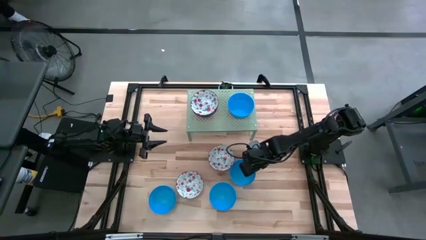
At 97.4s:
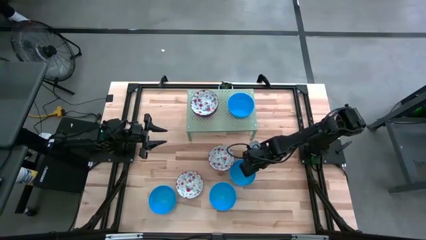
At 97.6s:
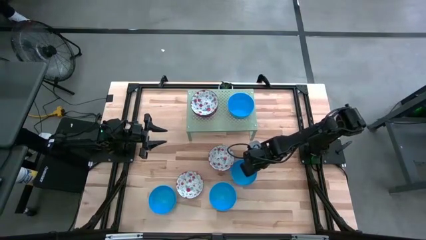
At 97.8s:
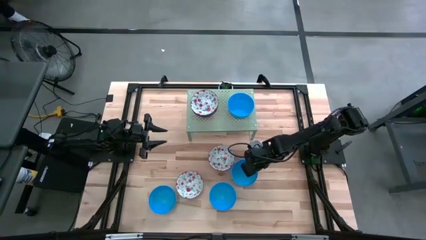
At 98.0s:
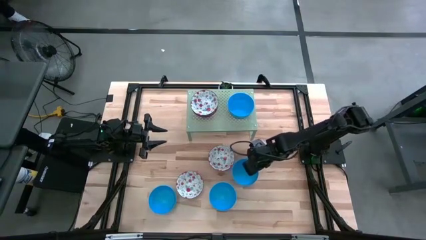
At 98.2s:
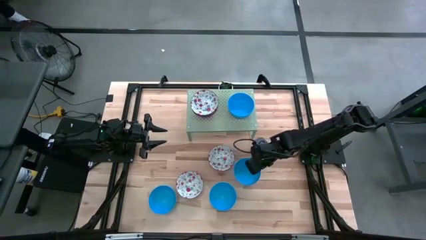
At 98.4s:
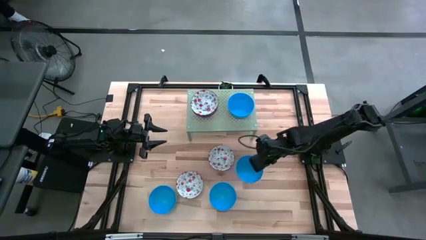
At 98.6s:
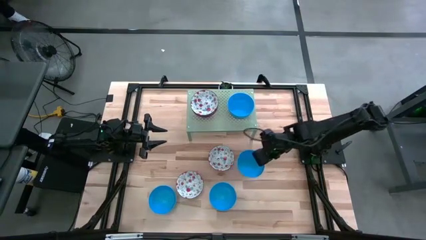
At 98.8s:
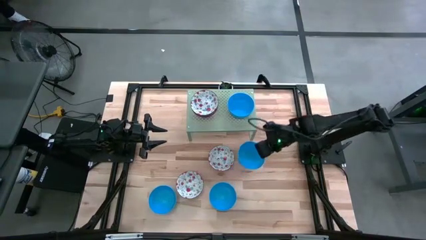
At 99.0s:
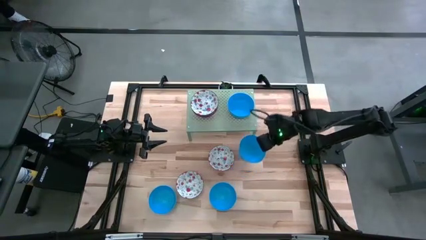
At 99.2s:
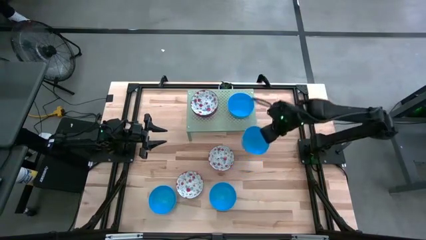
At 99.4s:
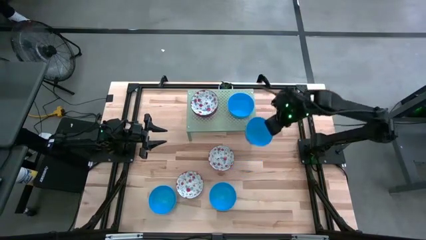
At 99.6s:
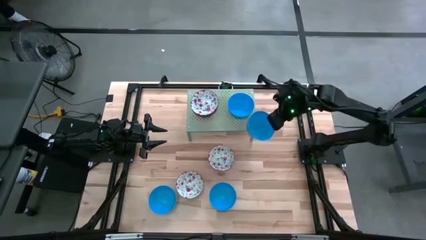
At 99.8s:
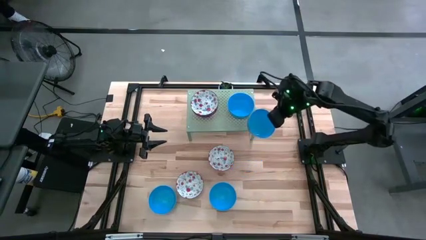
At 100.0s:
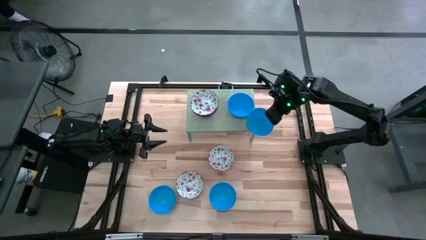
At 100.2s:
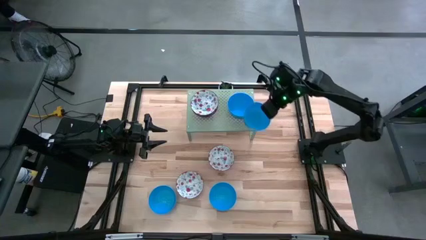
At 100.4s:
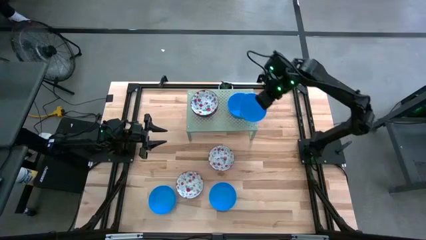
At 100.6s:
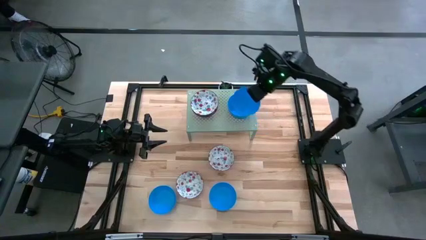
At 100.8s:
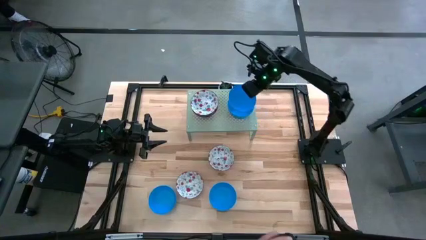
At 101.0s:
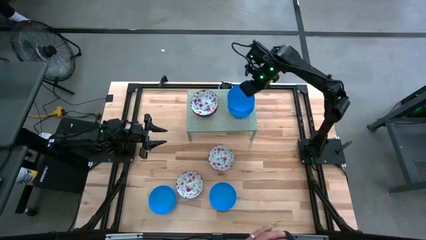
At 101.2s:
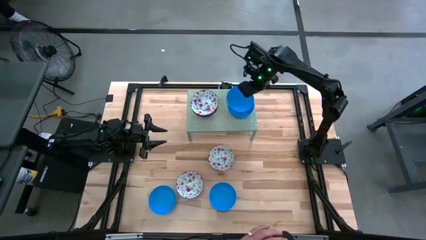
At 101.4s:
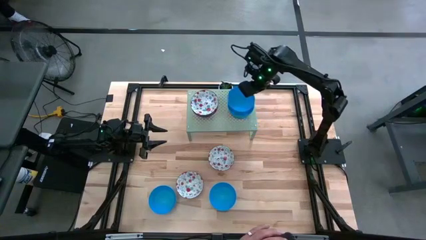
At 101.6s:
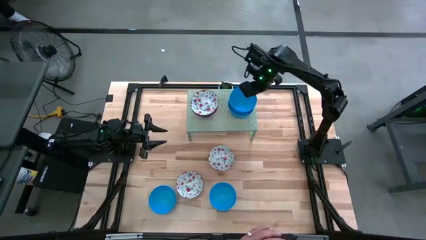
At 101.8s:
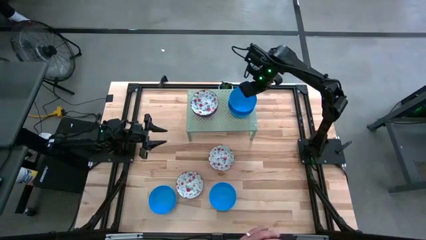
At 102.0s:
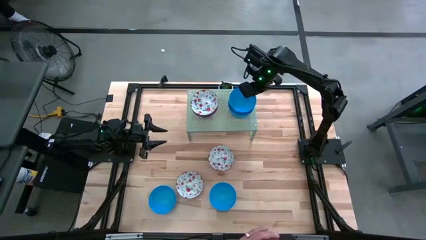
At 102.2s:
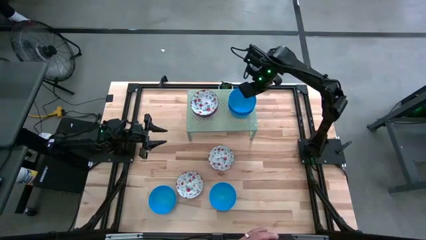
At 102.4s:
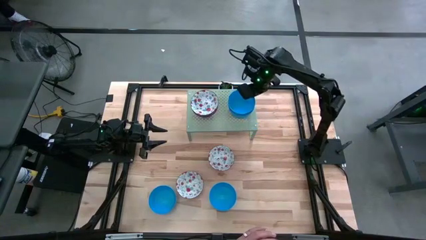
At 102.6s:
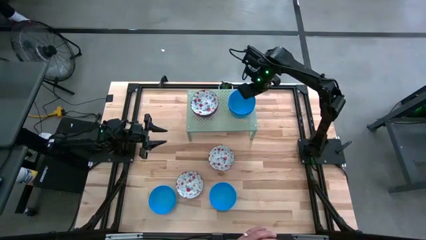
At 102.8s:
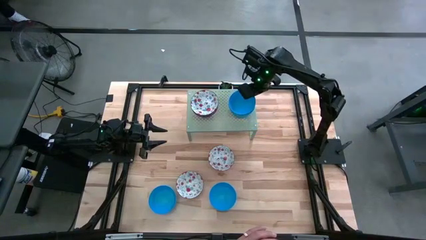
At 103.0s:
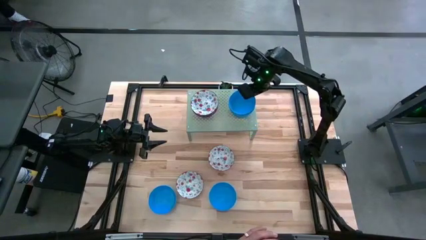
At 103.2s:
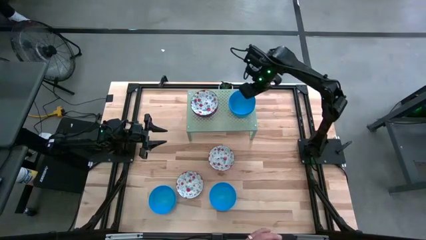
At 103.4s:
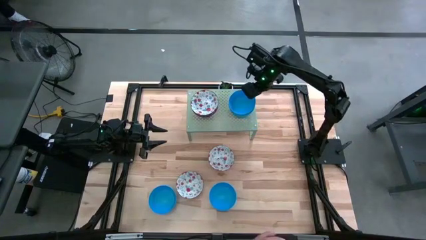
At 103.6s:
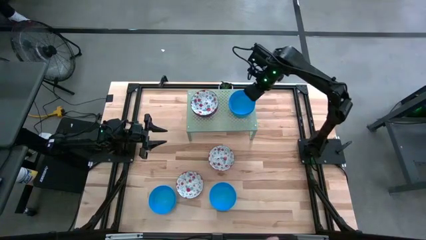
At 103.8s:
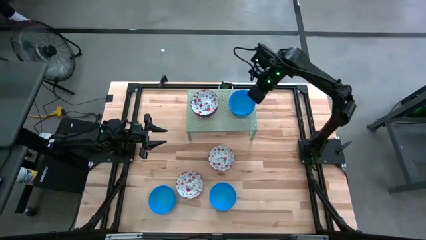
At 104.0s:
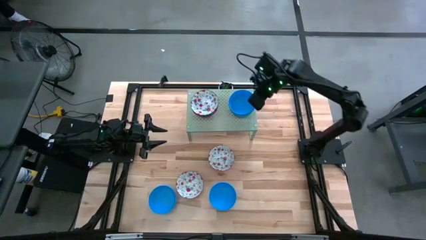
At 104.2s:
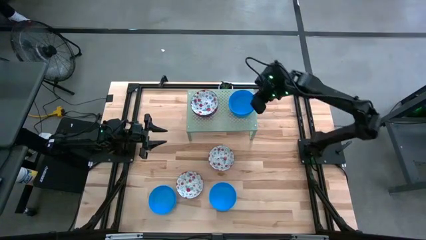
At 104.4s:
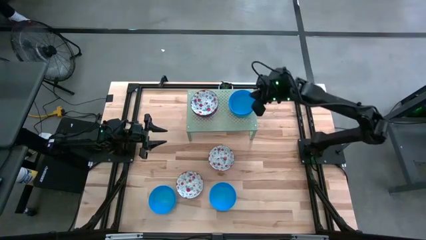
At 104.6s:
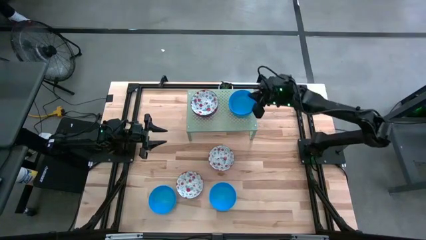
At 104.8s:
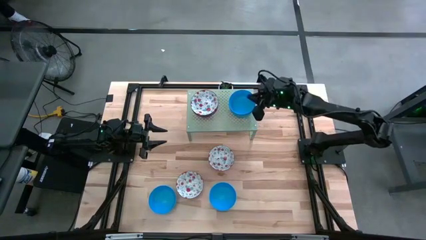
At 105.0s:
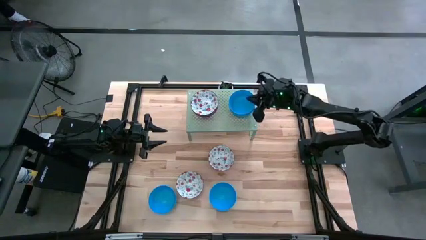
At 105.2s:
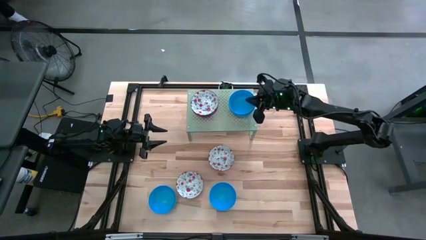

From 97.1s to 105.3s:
Task: Pick & Place Mini bowls
Stack the blue bowl on the blue bowl on the shelf

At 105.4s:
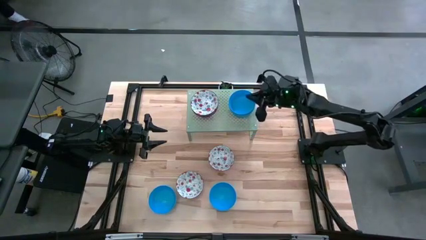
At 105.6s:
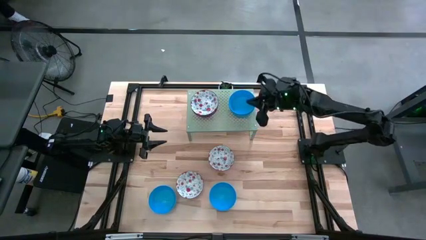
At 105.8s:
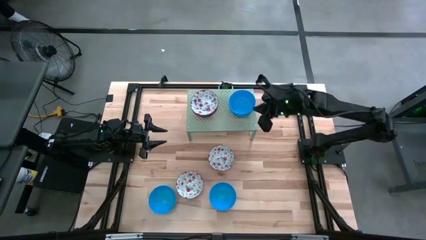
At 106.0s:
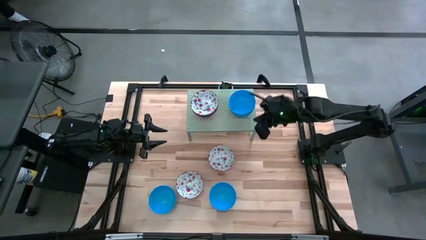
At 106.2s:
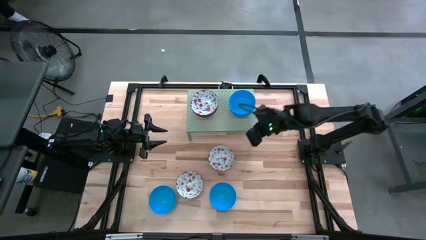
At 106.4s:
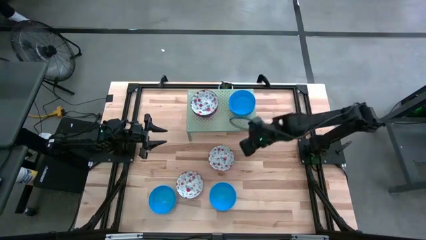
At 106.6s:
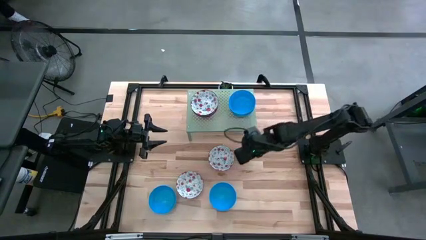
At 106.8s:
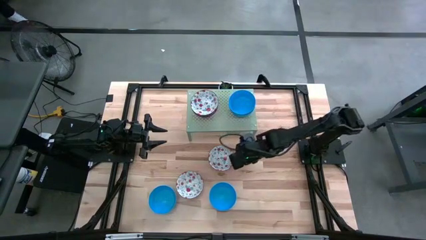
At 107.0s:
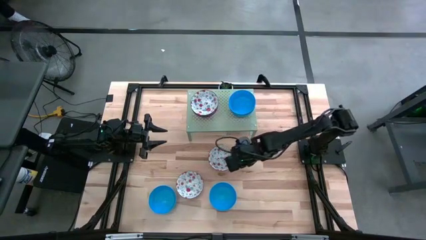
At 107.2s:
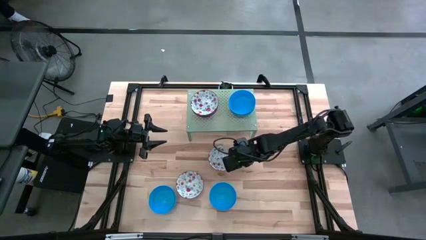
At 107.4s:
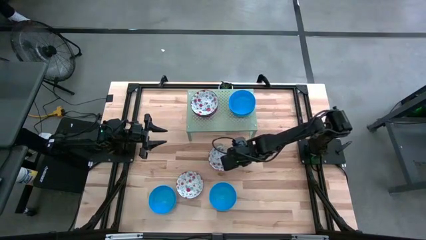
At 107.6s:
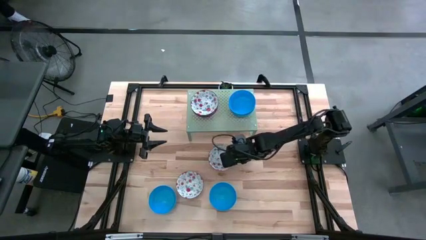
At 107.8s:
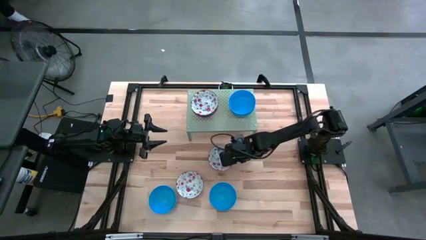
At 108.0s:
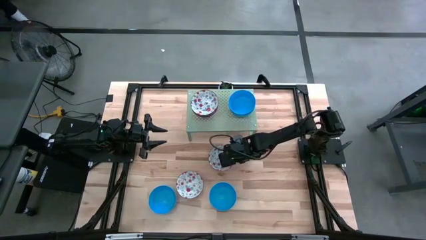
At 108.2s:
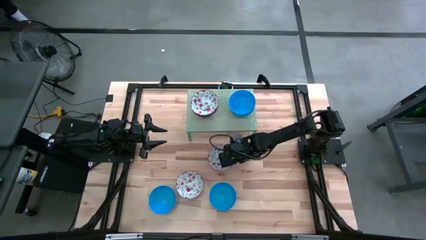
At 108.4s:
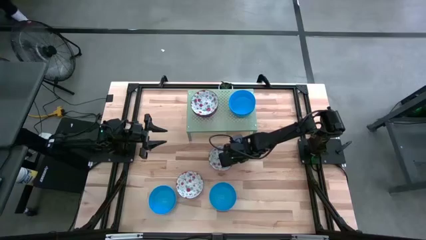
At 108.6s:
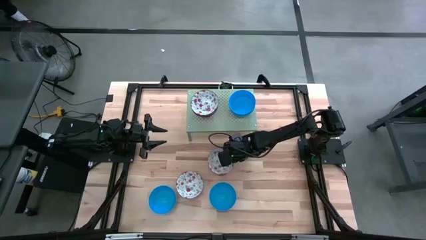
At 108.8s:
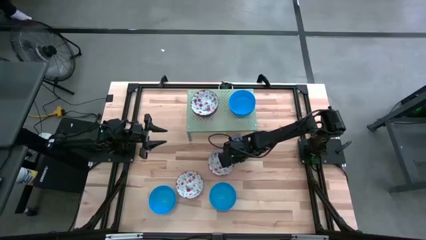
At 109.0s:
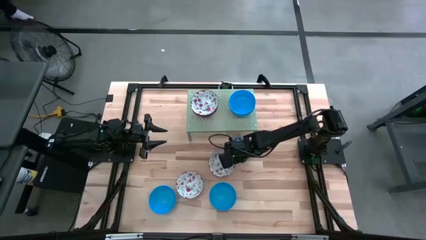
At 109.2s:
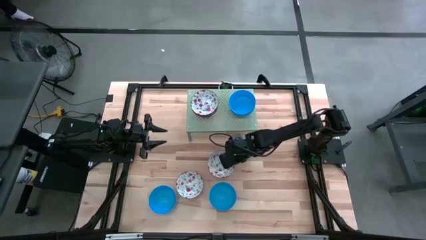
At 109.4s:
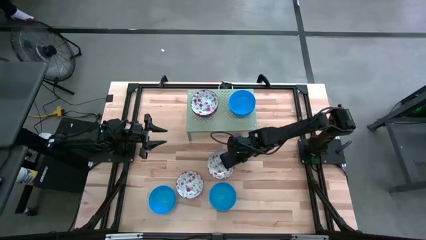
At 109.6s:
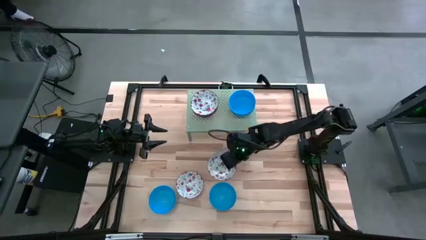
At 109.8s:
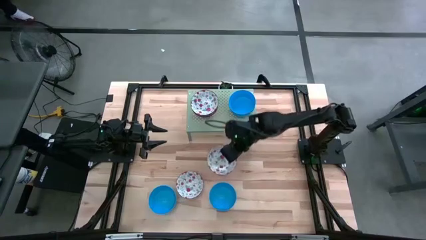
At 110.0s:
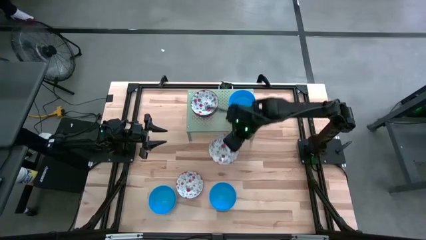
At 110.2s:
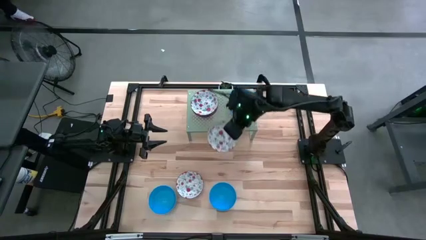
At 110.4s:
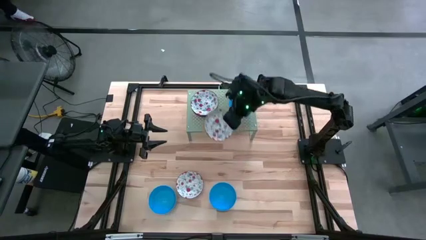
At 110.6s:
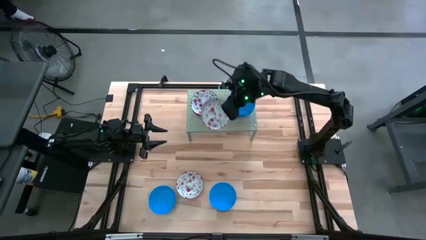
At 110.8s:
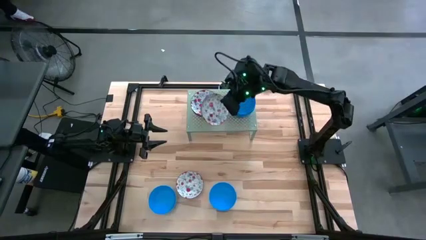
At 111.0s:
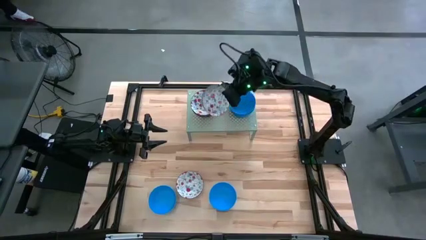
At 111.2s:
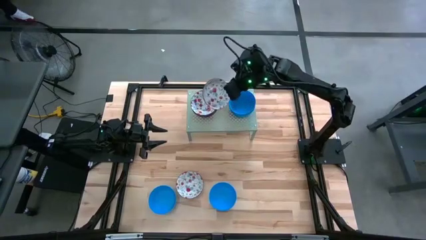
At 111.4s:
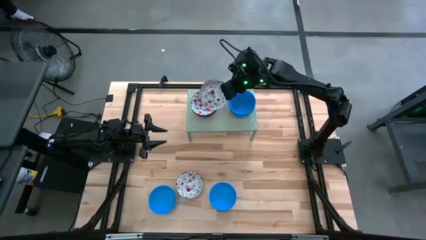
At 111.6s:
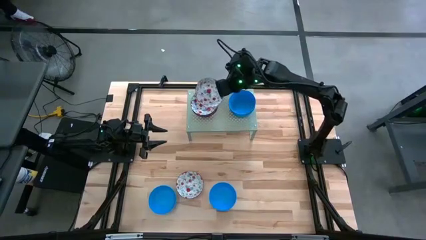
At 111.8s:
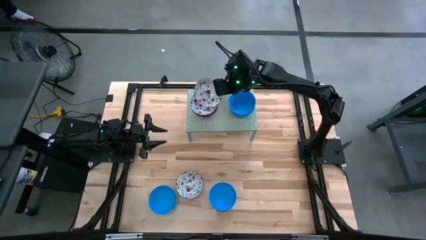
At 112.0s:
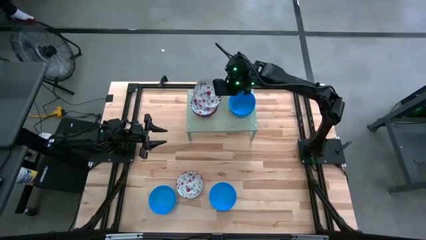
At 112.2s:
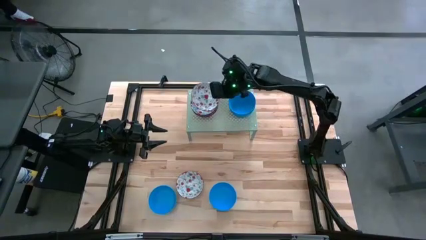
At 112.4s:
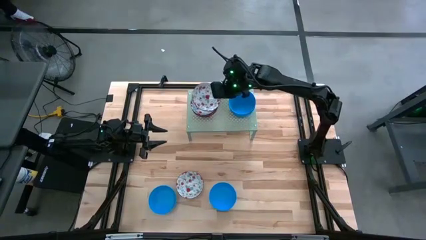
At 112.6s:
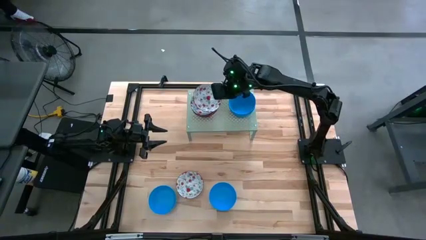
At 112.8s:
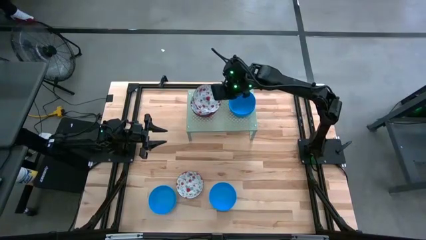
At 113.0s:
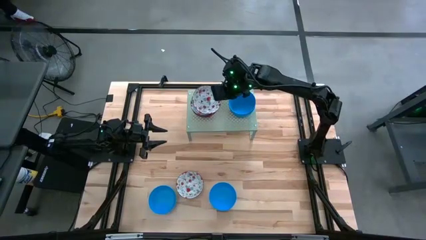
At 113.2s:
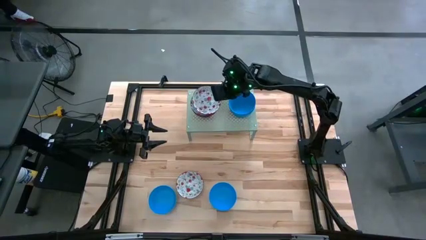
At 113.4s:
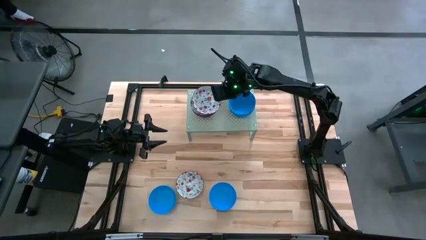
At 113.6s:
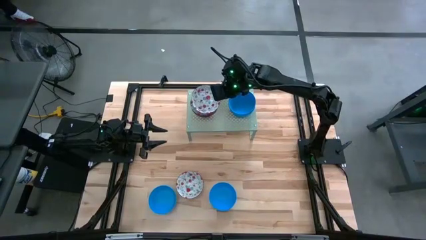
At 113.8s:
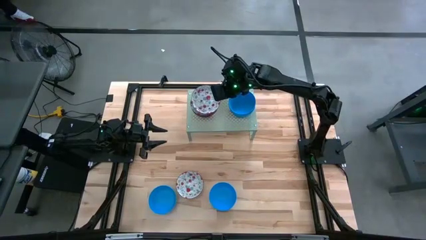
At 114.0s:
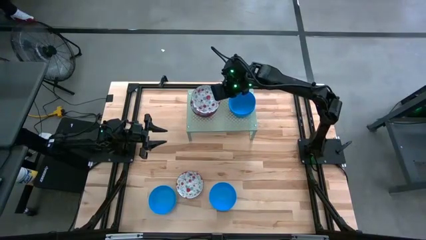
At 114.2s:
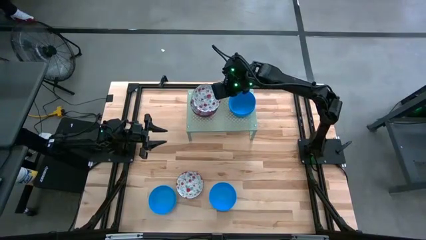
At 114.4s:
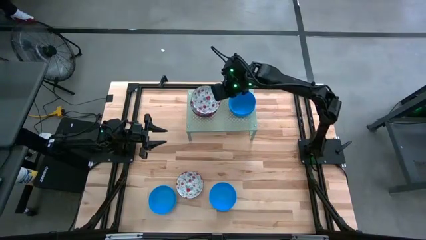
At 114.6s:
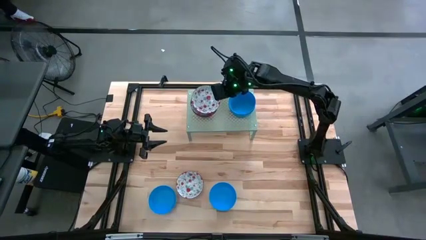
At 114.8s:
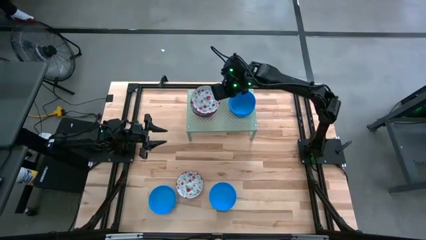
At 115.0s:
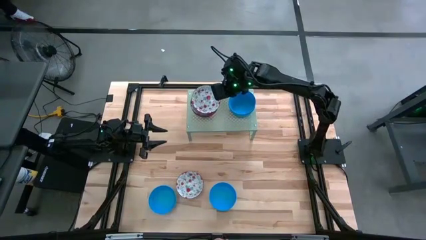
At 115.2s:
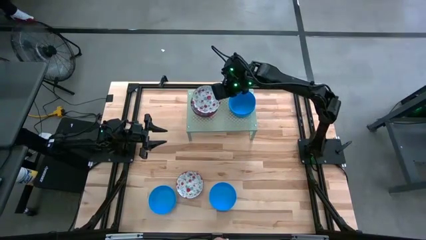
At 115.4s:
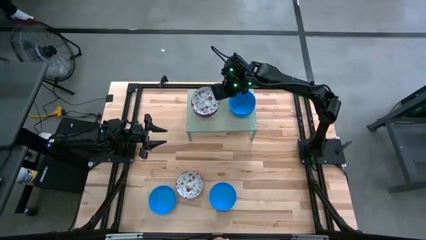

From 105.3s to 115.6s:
Stack the patterned red bowl on the patterned red bowl on the shelf
